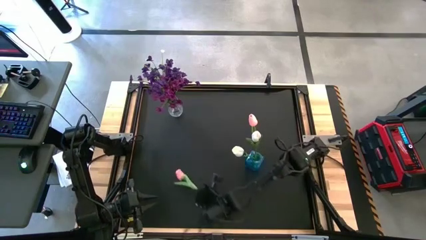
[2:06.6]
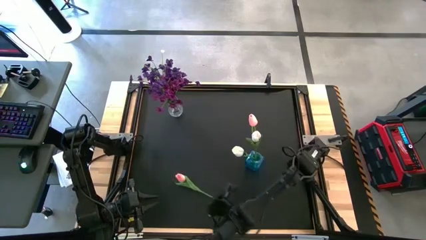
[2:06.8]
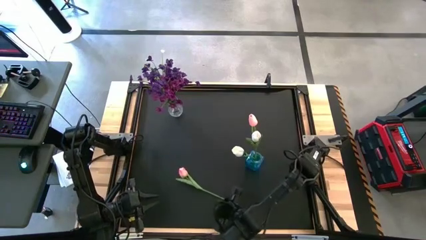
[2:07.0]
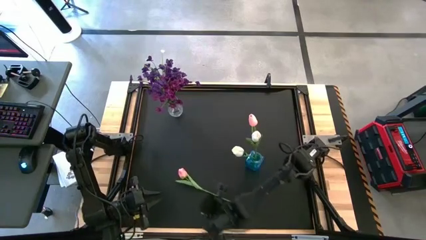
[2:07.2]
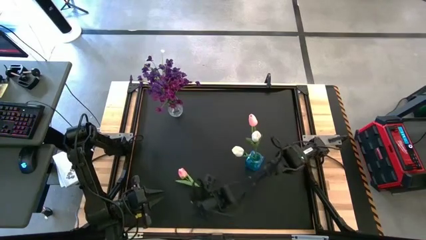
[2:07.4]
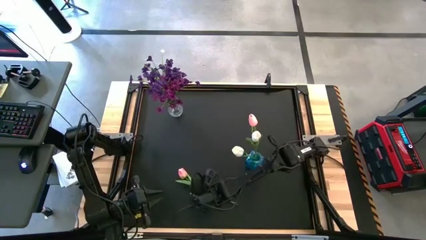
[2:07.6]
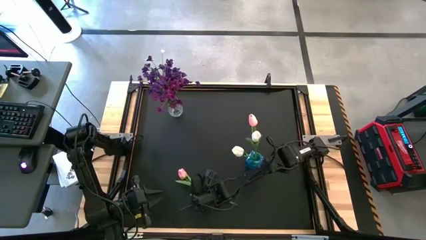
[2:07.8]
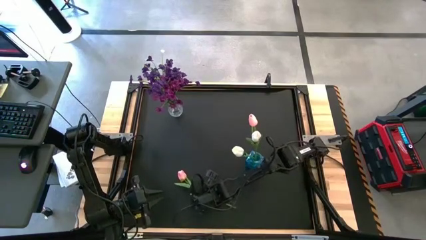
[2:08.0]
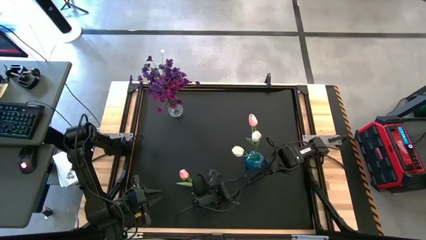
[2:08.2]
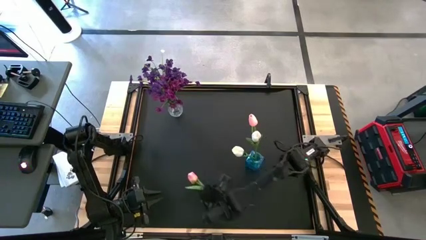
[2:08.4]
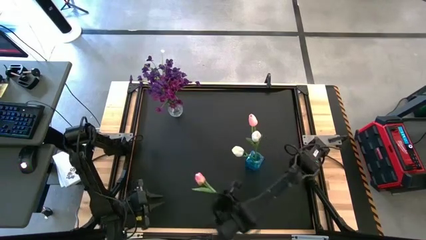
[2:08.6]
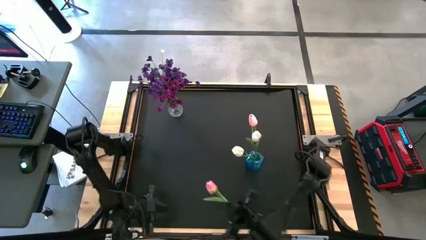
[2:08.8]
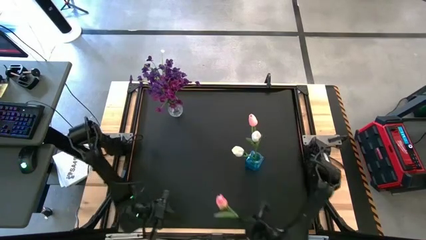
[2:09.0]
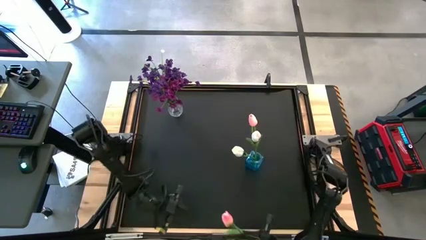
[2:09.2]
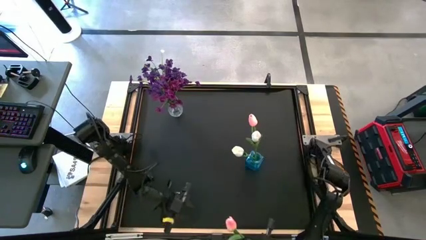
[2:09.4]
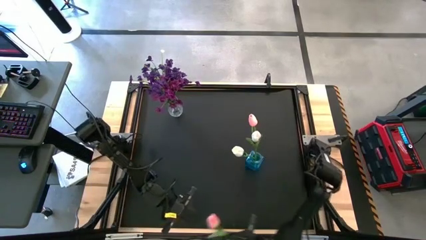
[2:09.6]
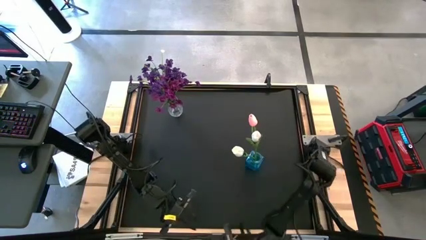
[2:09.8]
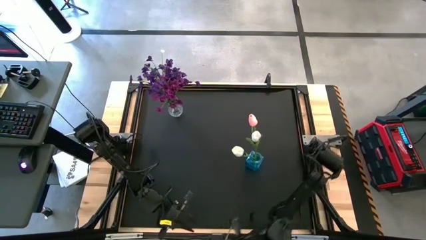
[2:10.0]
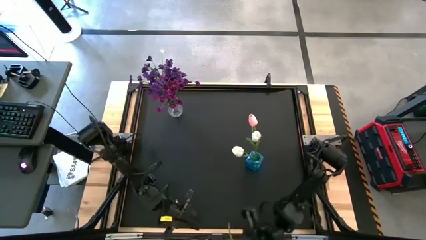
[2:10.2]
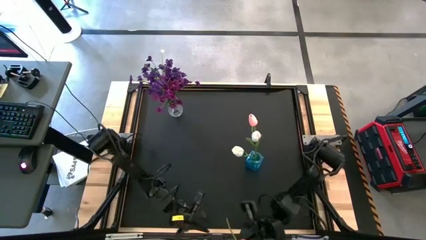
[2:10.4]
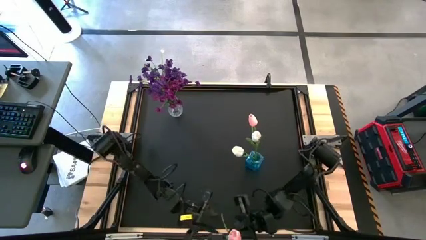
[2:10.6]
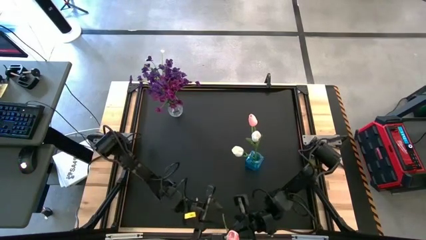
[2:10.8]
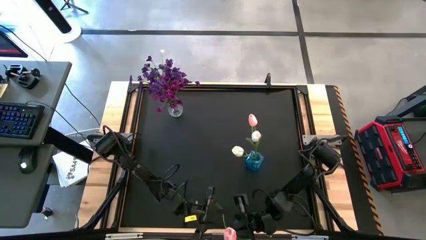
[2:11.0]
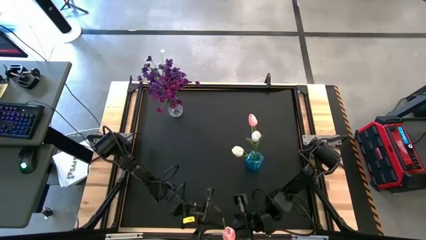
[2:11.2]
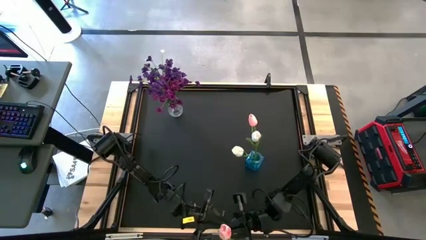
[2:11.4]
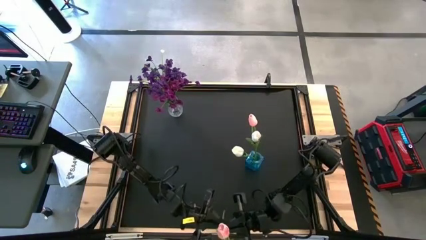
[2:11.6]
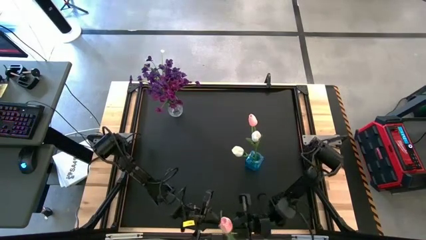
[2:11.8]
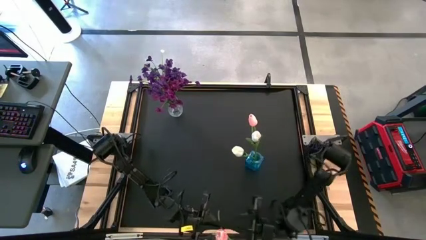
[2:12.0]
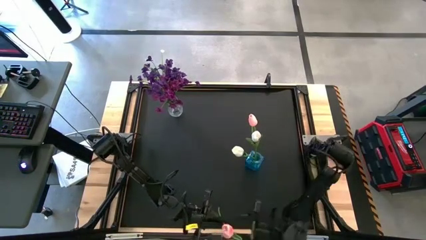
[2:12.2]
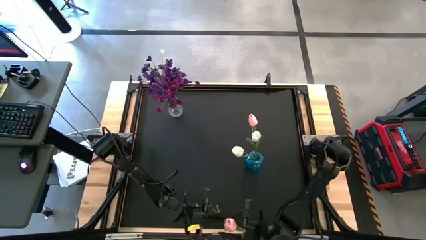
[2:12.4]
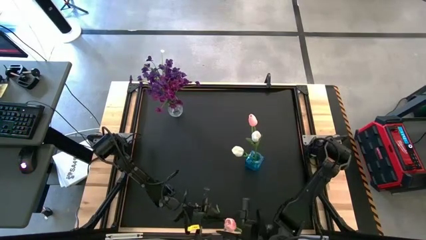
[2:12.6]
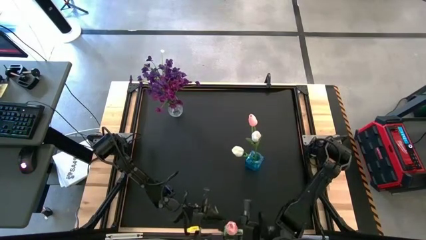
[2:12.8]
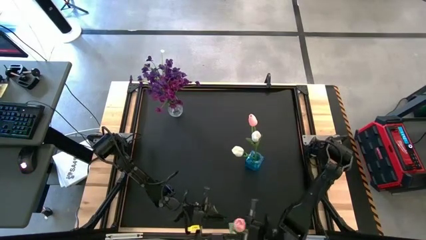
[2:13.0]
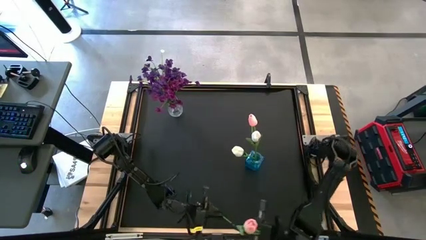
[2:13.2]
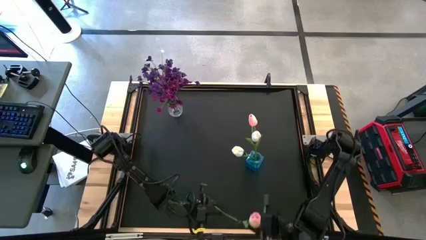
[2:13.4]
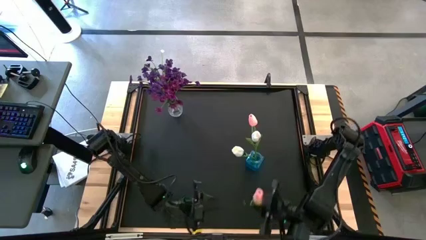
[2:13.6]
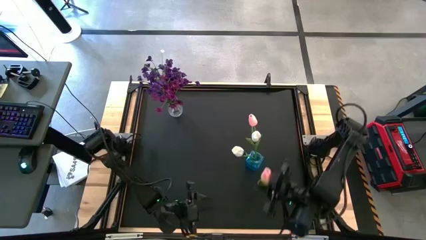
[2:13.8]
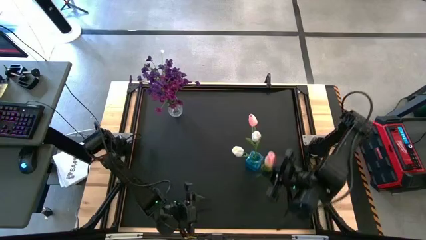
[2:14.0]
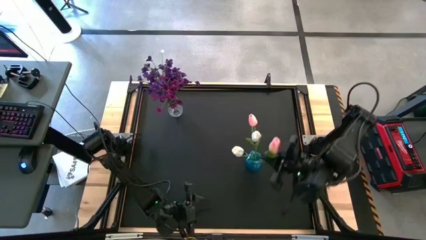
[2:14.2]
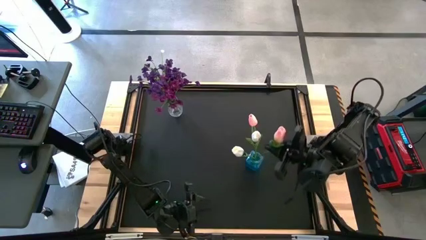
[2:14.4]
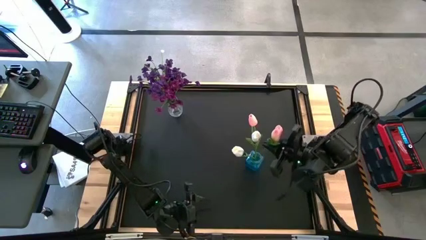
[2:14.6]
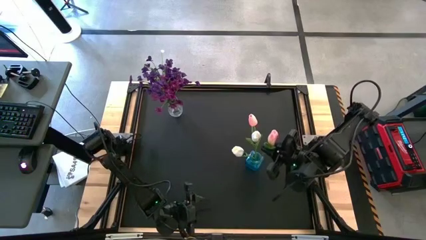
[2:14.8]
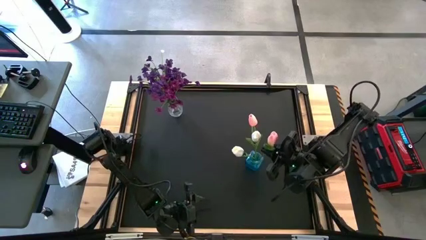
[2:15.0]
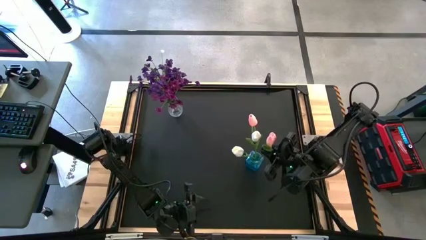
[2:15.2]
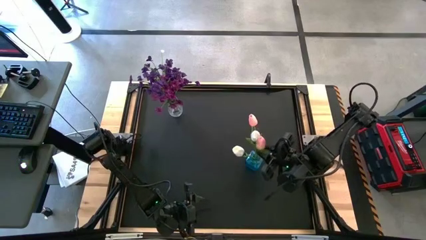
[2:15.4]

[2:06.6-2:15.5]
Task: Sort flowers into vase by color
Put the pink flower into the transparent blue vase

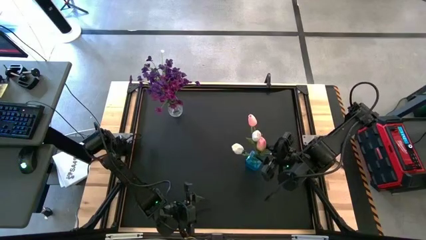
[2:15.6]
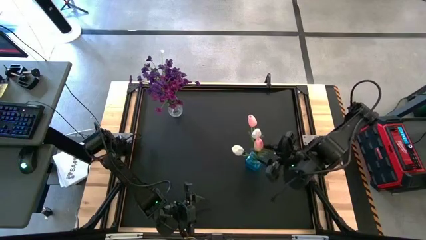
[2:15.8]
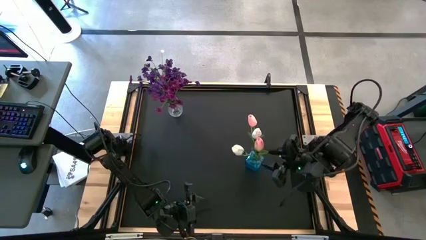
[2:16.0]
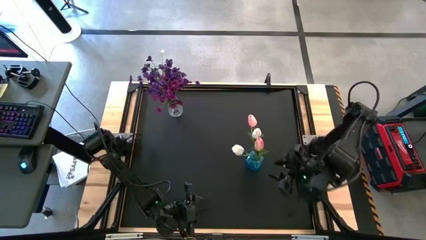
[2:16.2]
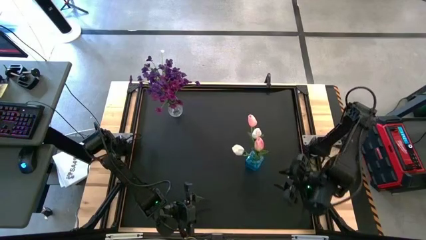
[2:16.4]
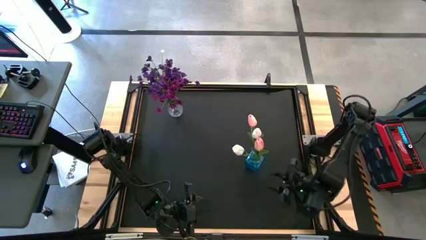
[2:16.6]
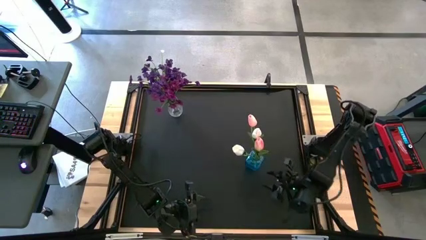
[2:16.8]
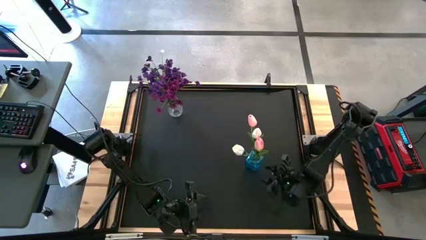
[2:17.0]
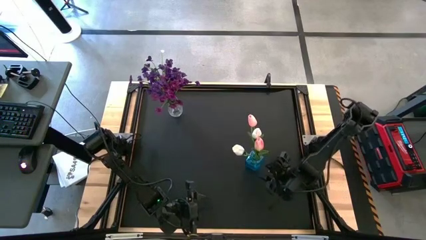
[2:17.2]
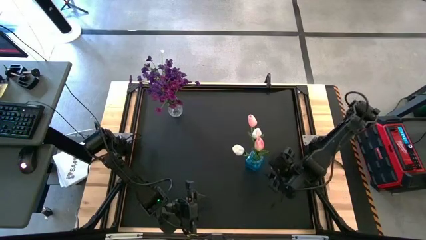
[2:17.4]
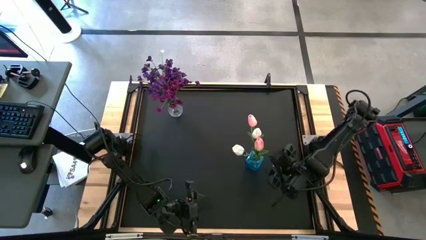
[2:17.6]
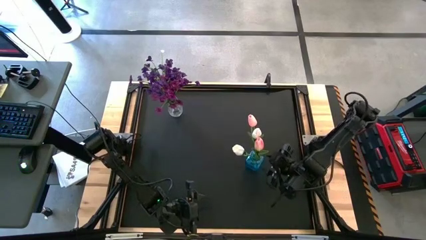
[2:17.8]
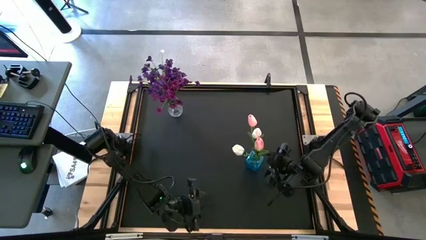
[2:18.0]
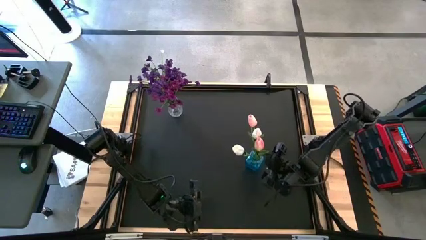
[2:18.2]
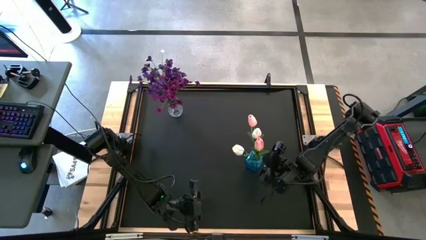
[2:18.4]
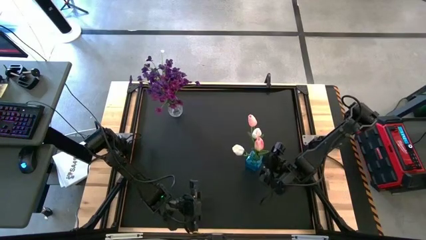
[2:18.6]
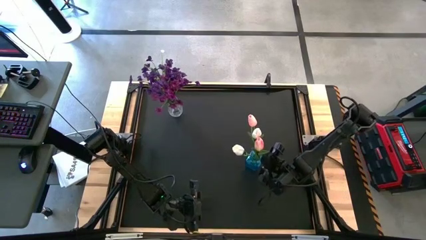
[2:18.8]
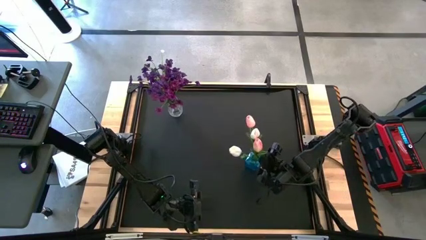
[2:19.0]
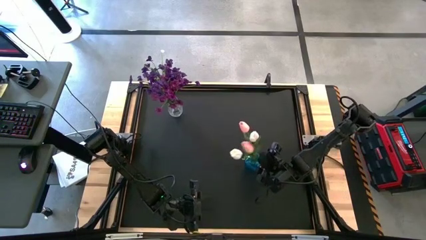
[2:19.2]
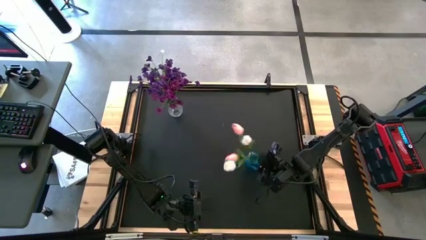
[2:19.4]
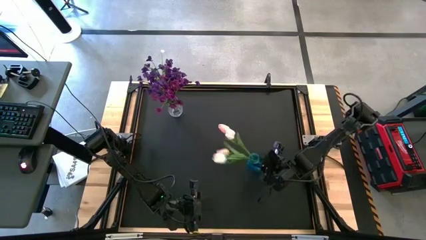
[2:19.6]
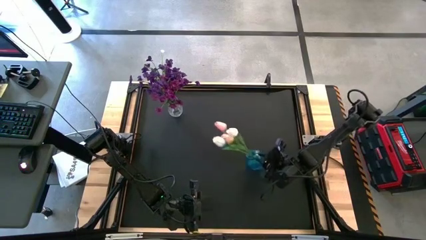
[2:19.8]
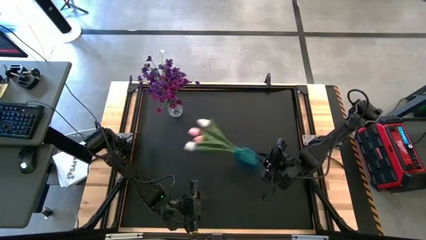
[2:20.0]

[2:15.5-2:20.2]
Move the transparent blue vase to the top right of the table
